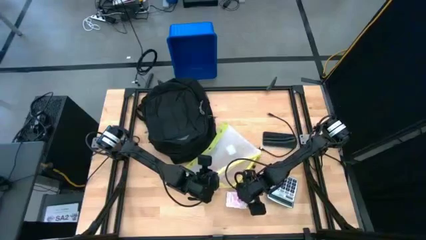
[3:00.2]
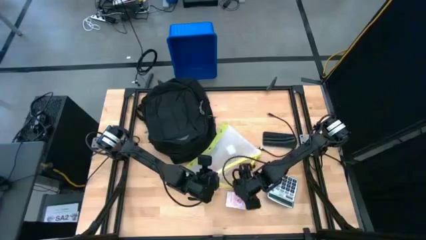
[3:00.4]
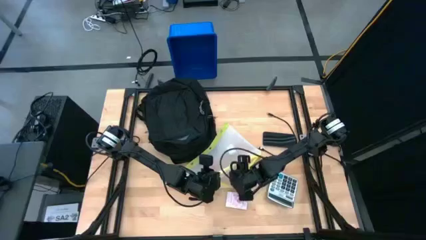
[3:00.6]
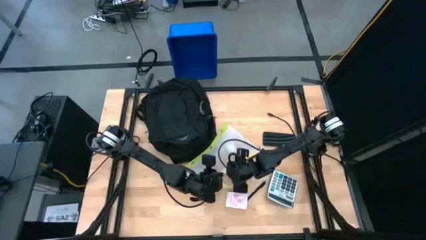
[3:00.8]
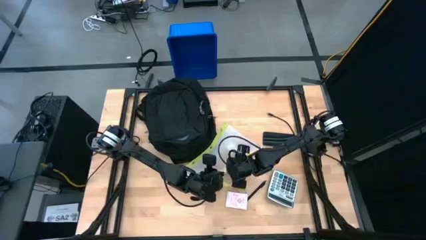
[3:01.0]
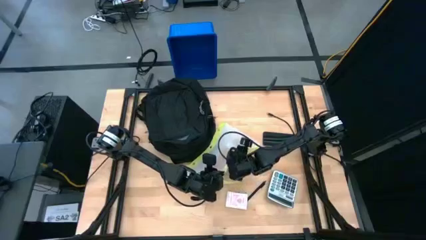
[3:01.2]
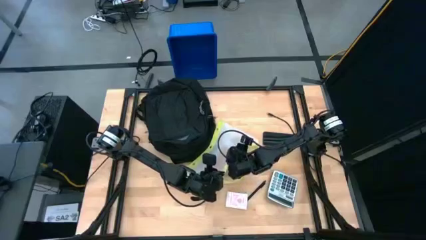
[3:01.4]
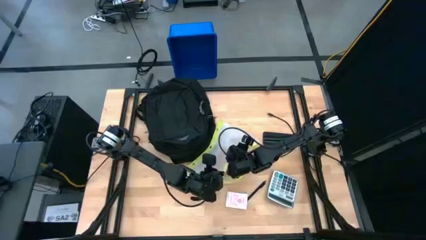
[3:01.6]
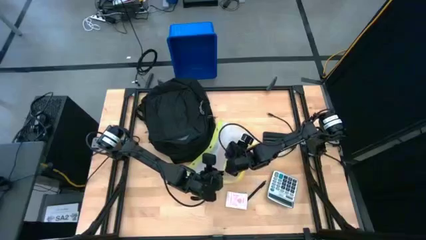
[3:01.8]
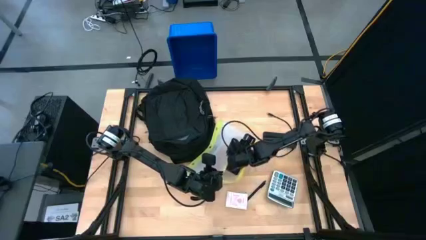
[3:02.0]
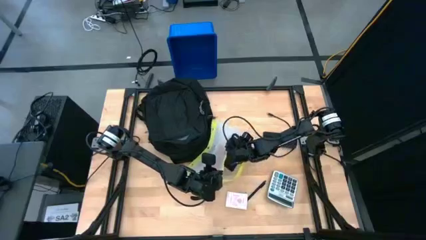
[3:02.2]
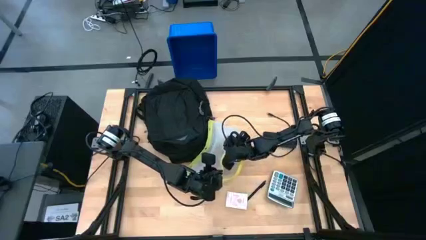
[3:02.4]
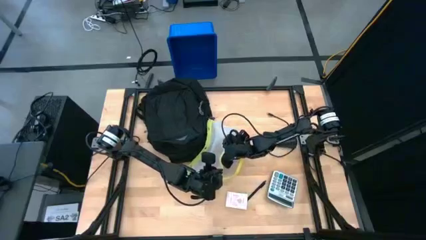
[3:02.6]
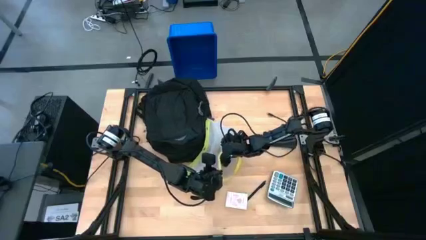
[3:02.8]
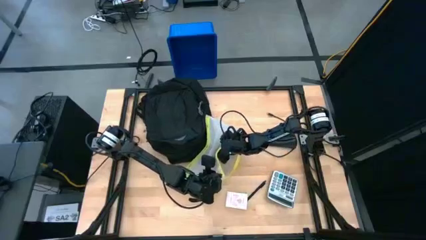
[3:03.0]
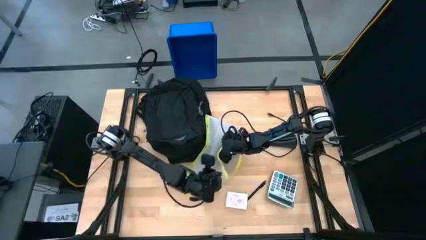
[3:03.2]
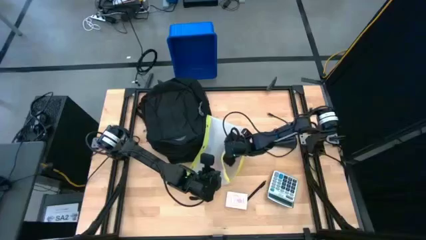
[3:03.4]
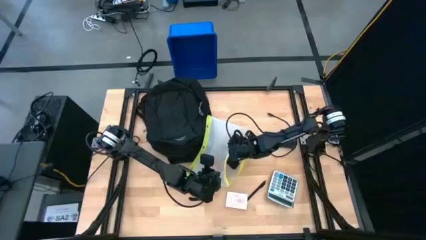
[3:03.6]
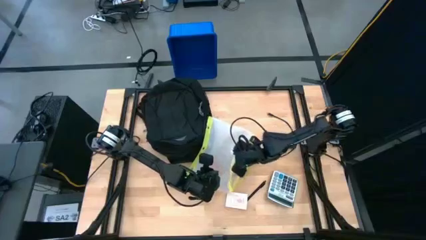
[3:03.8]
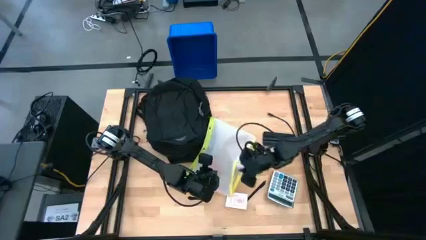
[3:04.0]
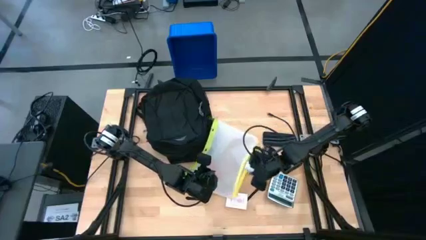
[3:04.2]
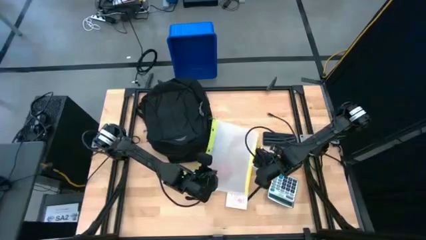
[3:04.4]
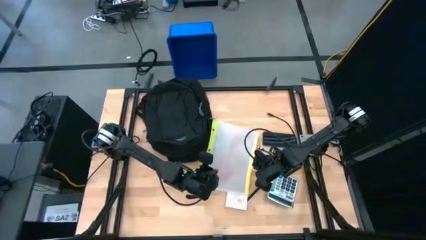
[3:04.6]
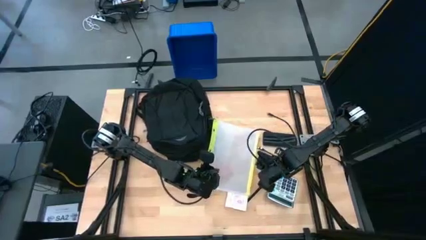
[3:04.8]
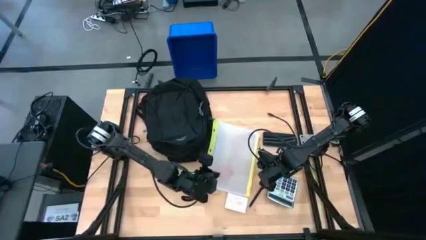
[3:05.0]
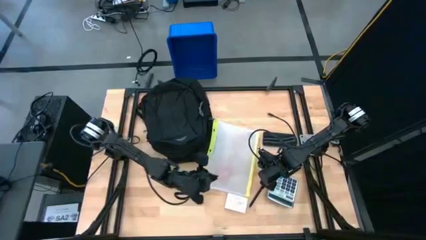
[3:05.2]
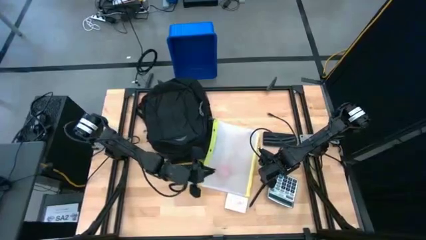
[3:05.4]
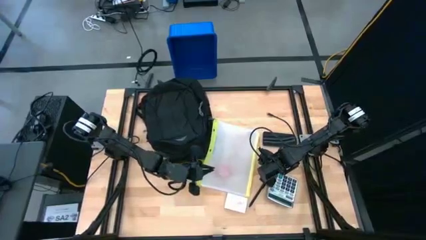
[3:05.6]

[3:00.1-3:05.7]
Task: Unpack backpack
Remove the charger adapter from the zip lock bag

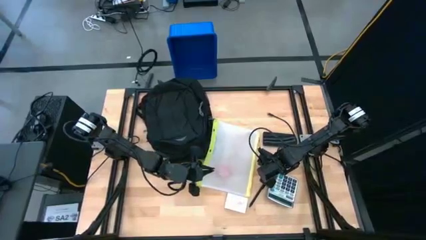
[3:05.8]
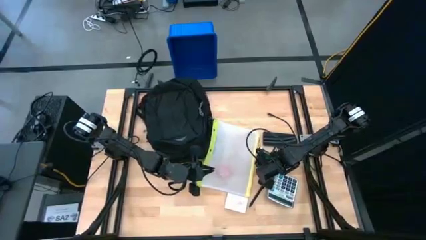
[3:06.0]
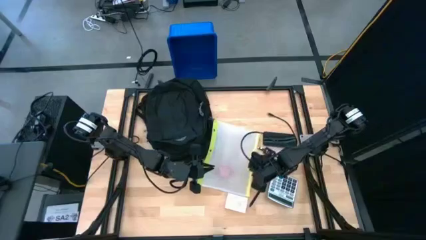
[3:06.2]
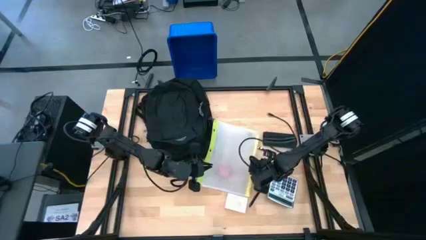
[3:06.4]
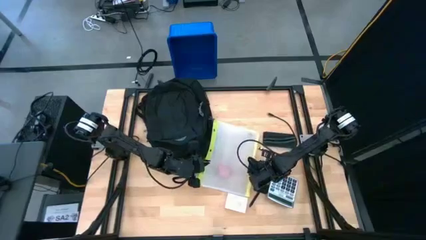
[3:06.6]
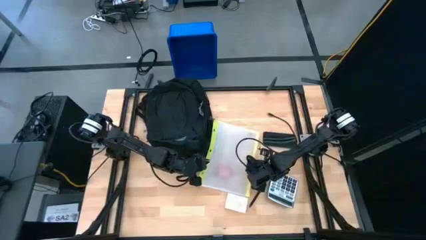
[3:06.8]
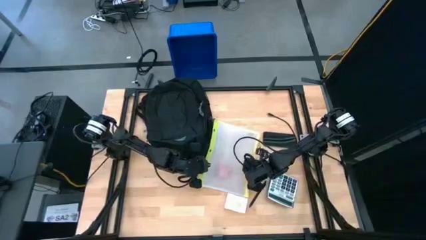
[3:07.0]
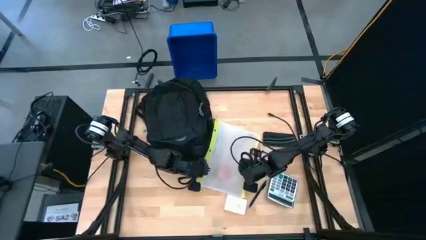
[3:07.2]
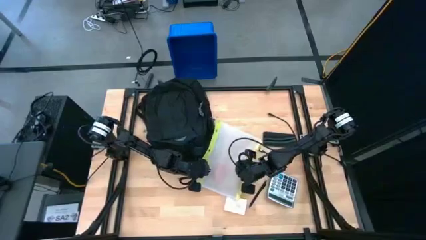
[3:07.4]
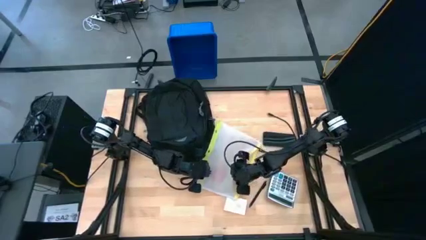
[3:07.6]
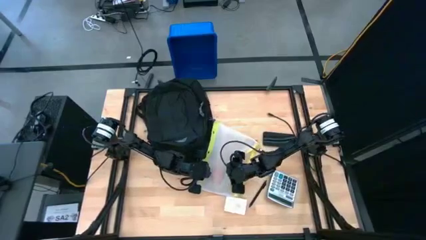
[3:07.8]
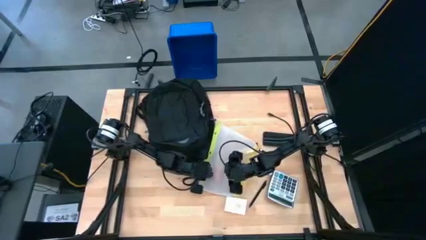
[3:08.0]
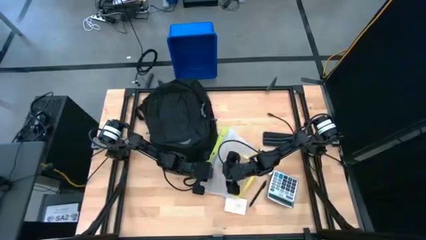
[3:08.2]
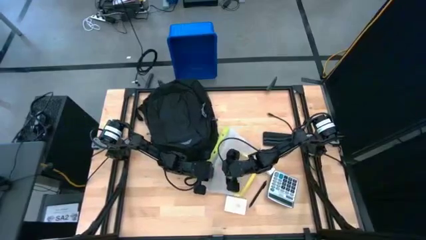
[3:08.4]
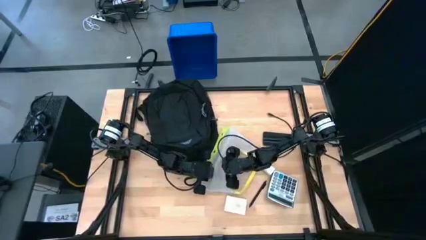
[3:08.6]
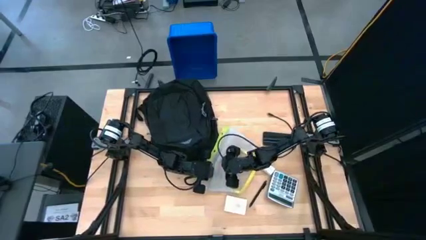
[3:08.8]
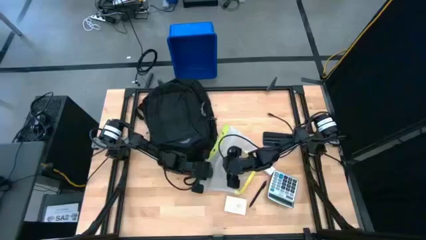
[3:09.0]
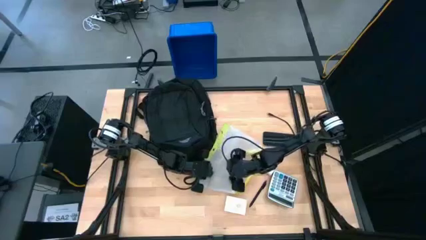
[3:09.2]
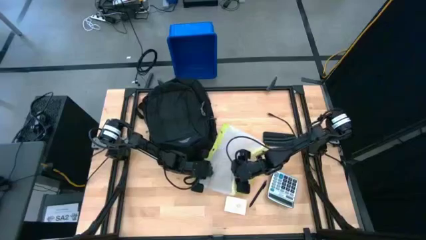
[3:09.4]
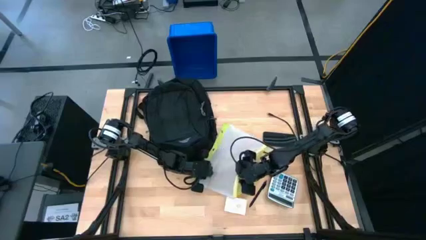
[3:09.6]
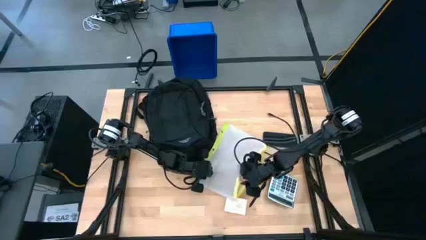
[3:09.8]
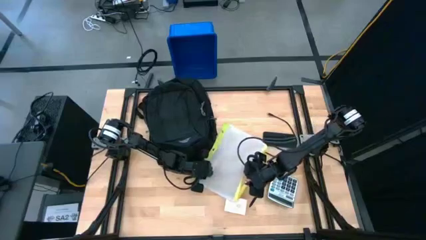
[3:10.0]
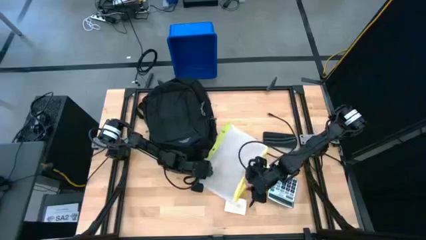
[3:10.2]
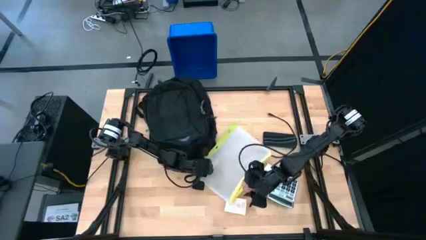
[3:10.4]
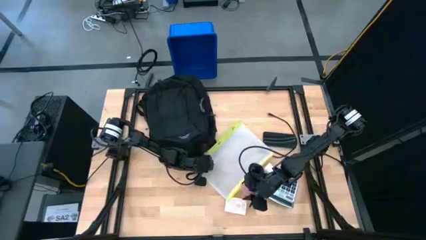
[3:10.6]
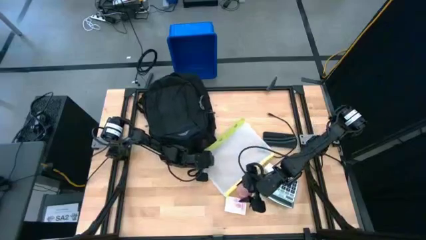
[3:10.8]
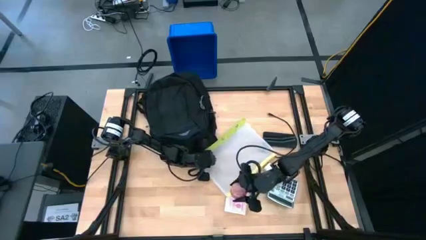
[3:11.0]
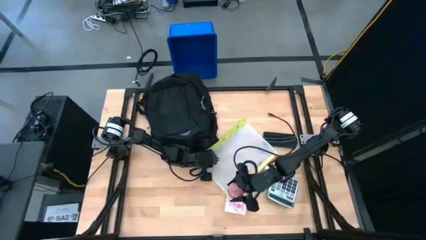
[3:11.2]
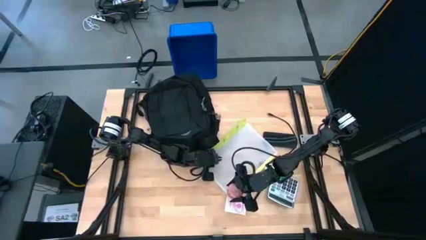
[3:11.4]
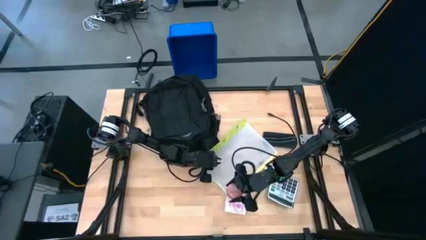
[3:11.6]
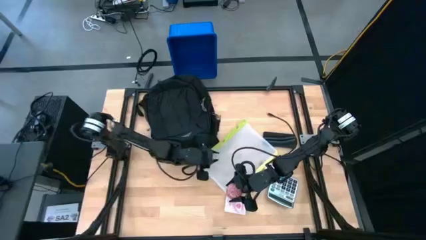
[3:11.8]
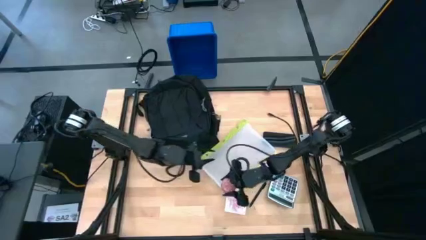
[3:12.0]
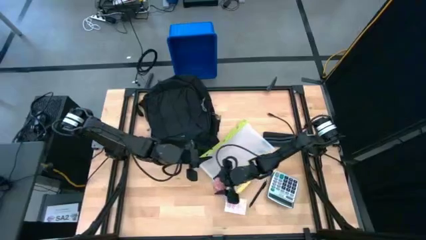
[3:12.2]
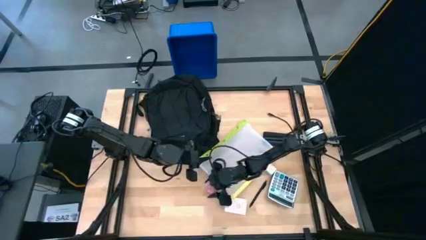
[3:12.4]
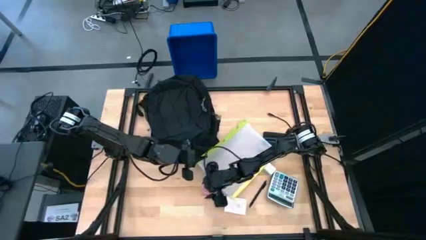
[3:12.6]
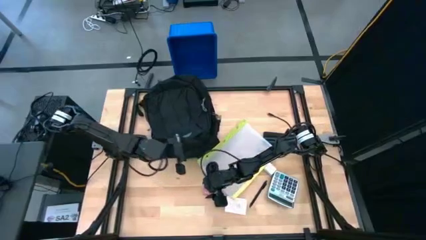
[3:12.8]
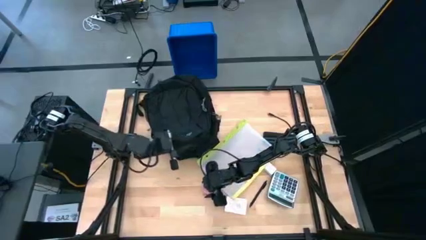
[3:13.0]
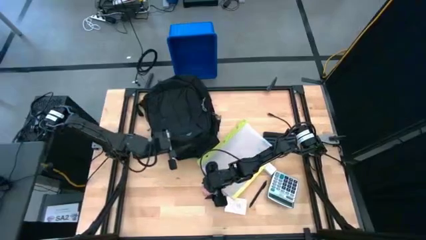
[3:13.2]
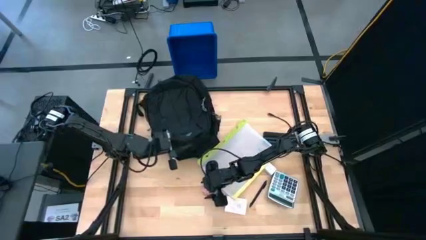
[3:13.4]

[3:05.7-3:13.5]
Remove the red item from the zip lock bag

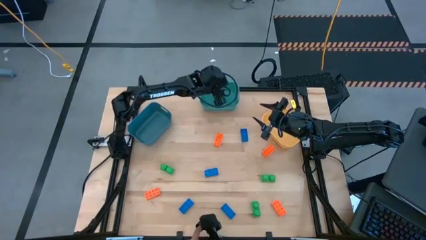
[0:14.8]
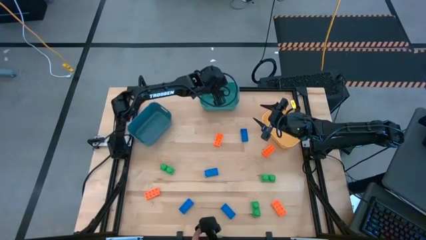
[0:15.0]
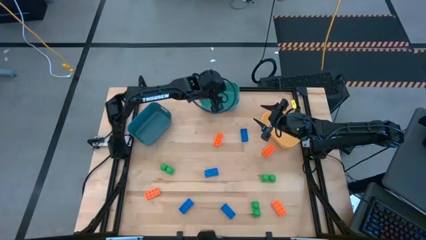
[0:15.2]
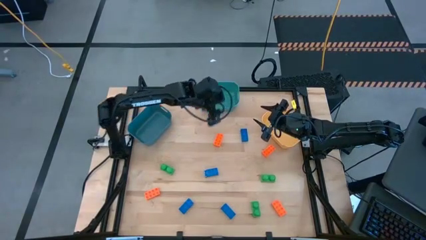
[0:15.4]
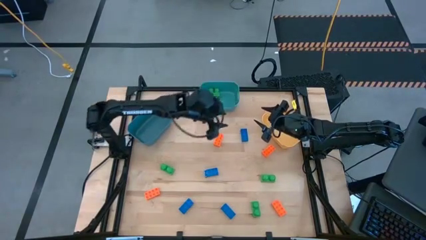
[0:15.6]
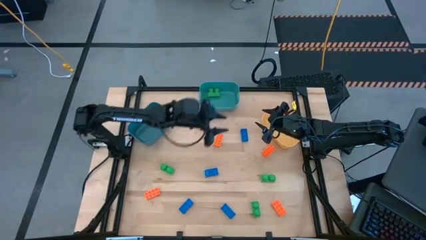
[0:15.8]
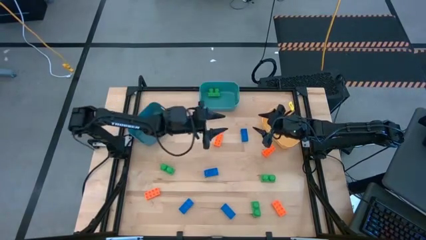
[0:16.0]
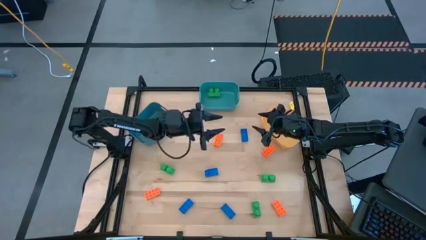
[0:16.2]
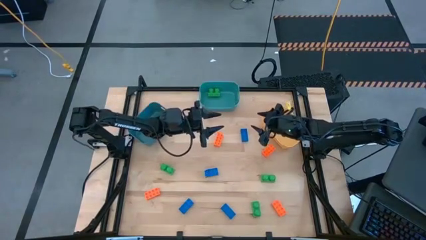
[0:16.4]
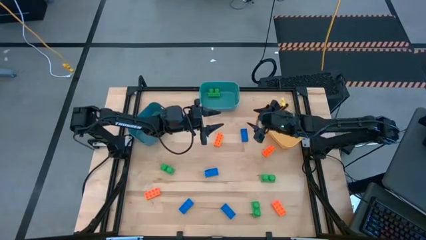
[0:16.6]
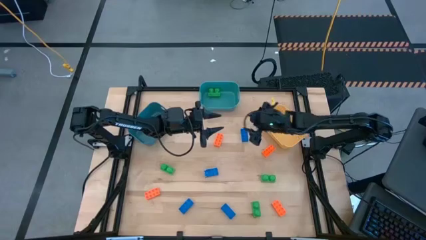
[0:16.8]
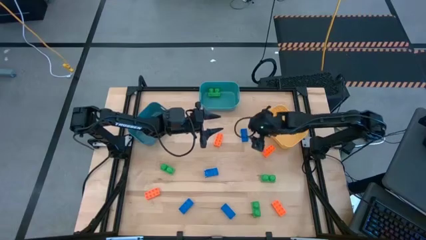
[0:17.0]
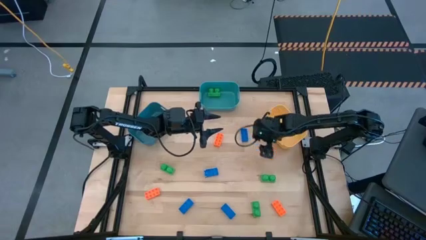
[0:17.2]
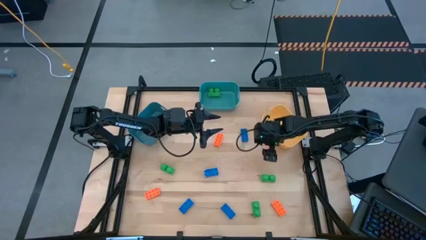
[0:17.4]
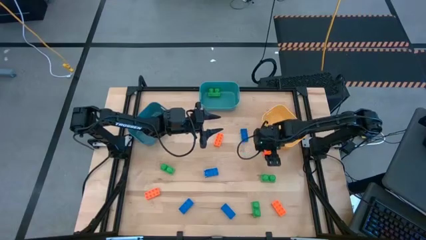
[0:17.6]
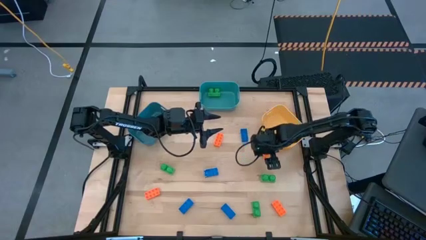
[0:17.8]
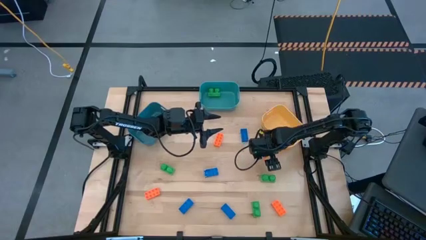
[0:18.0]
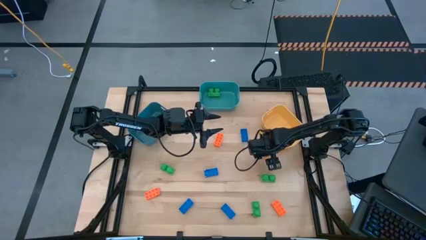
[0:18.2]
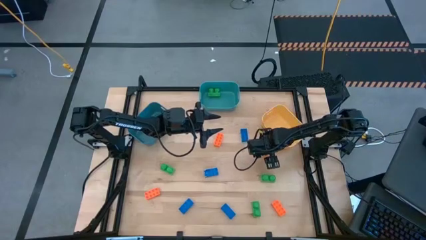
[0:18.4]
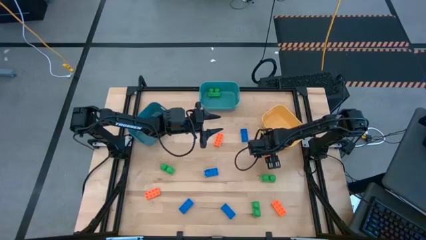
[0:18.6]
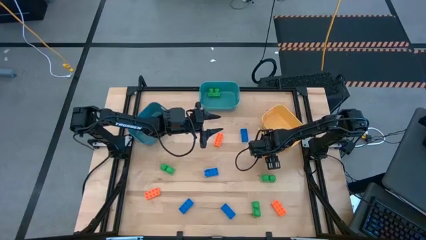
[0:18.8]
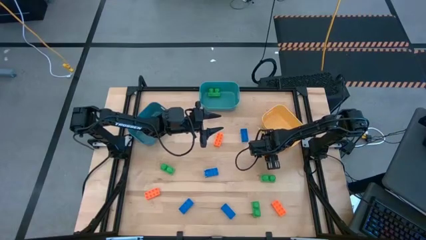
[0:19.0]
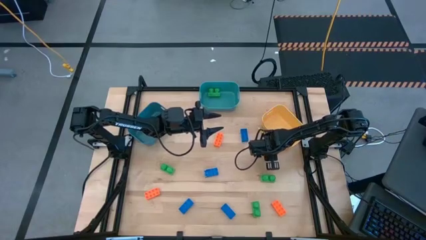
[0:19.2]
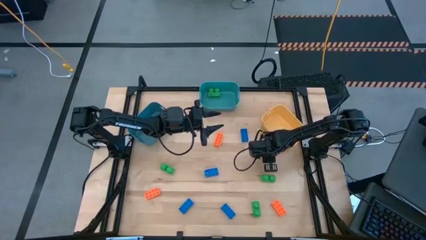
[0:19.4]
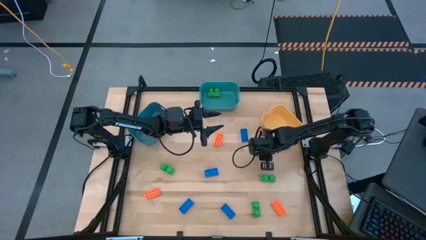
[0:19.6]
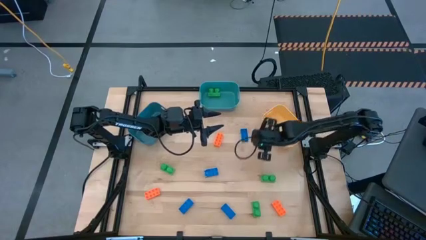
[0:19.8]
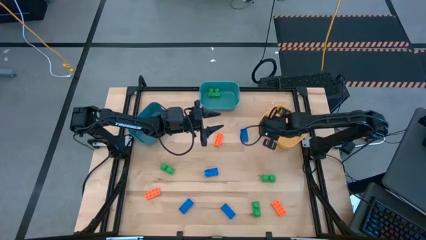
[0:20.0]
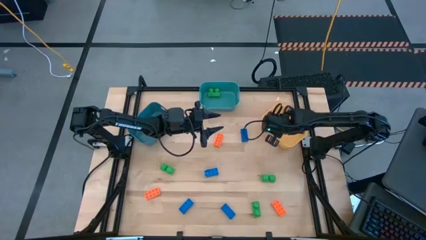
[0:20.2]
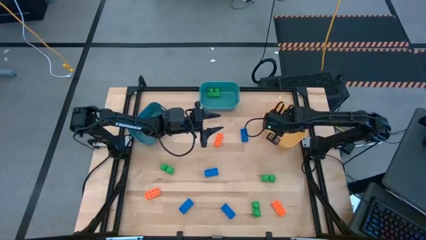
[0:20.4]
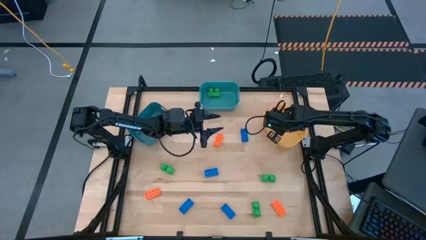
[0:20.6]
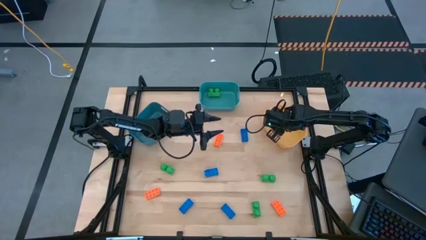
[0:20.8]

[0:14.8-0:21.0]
Task: Sort & place blocks by color
Put the orange game piece into the yellow bin
